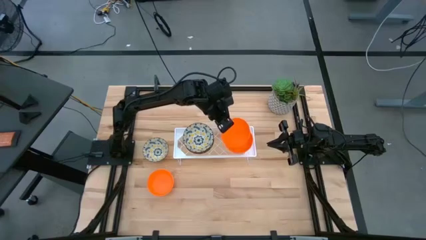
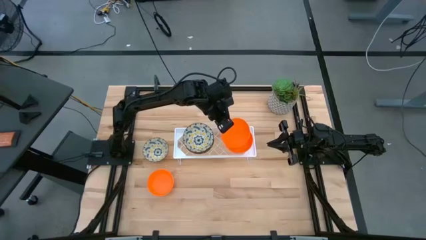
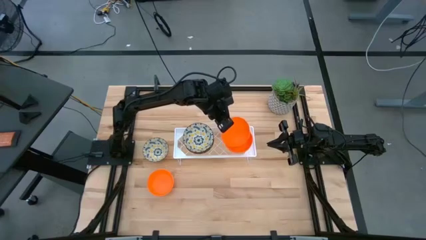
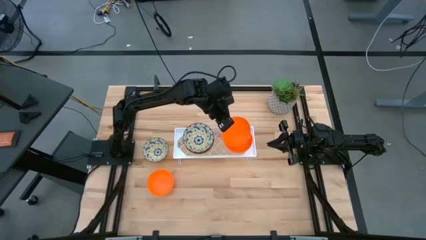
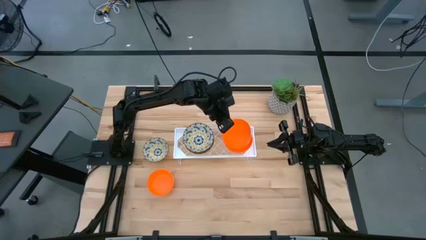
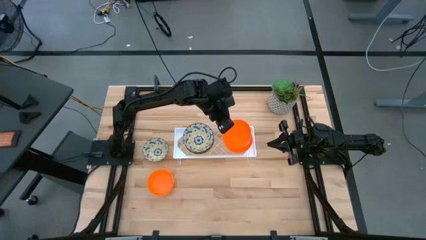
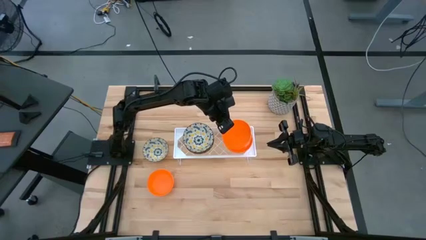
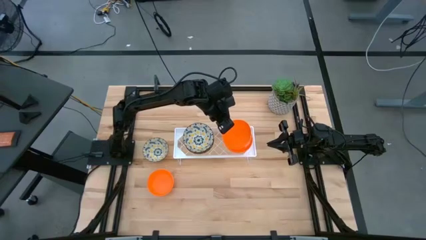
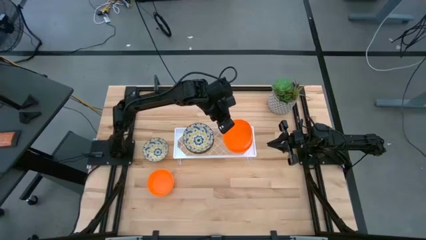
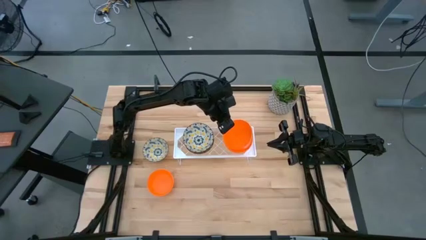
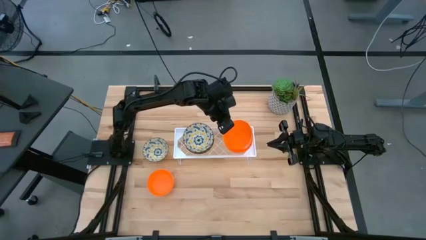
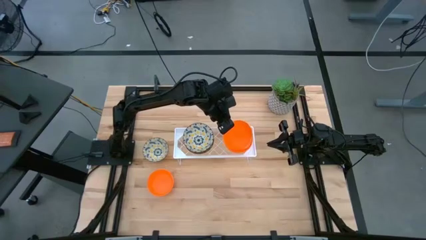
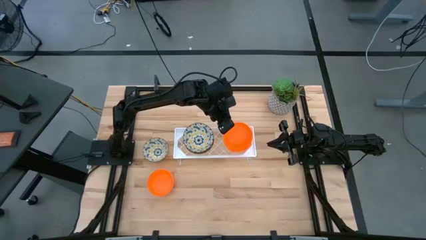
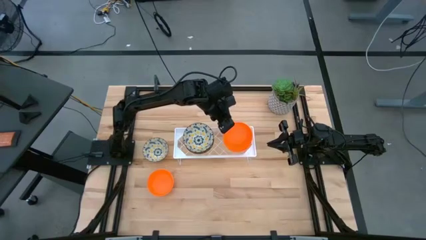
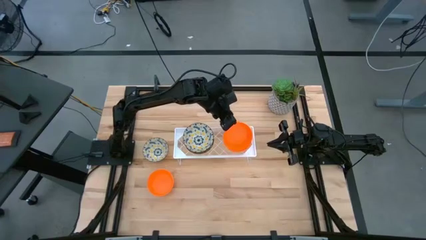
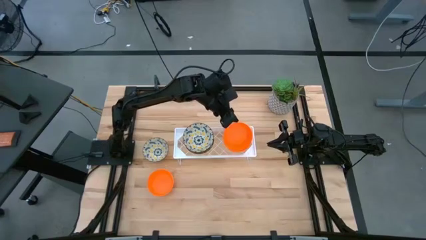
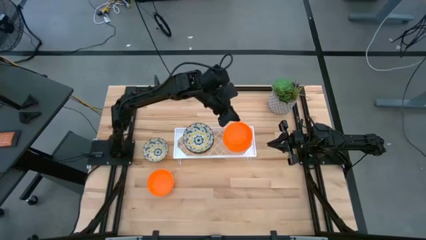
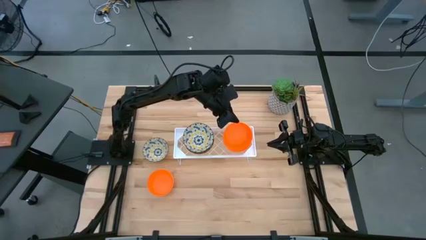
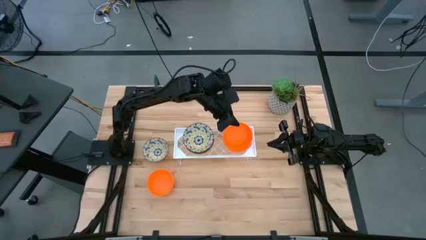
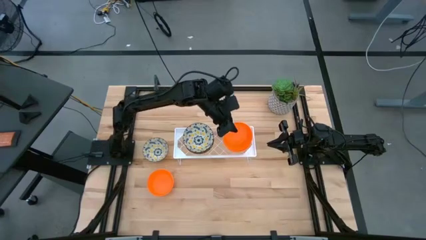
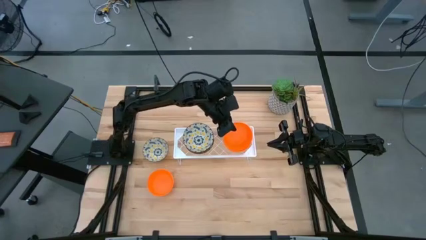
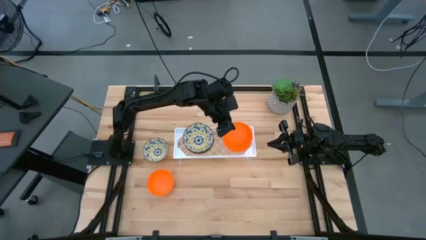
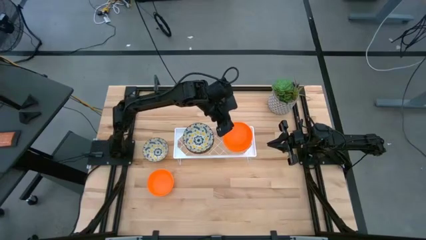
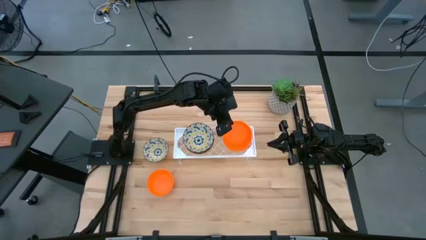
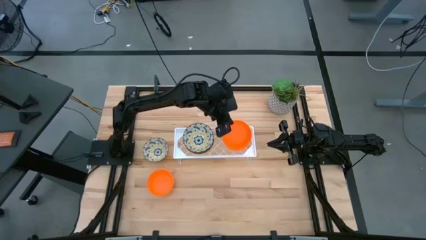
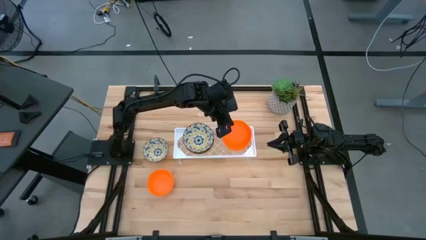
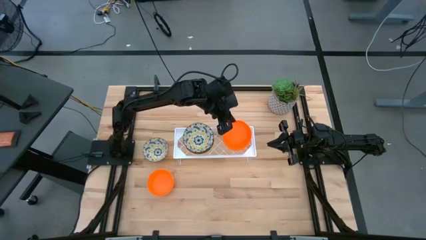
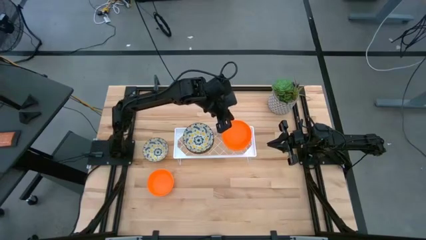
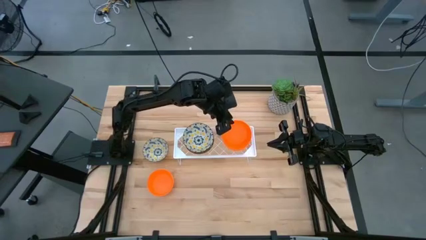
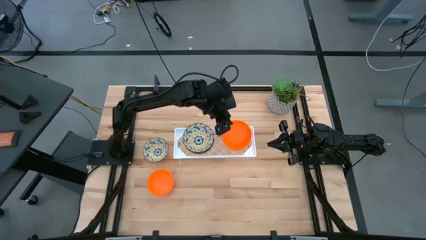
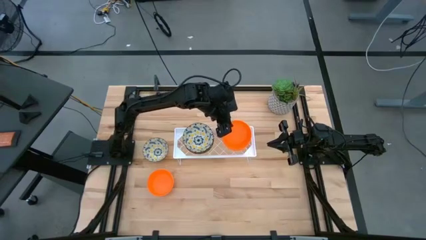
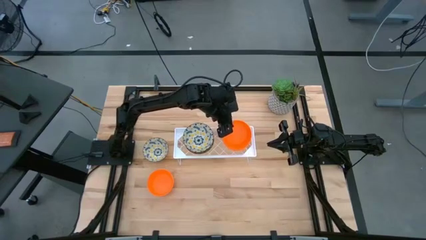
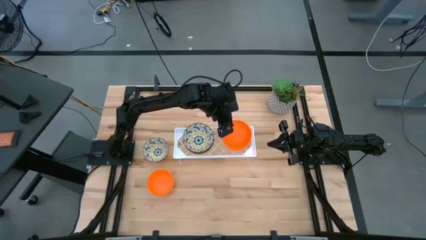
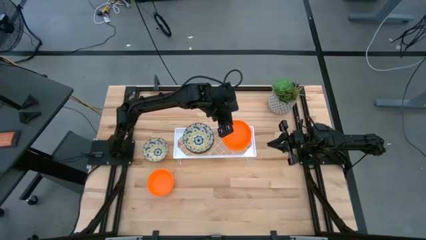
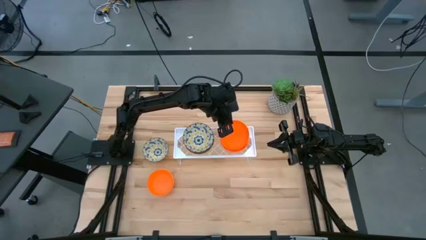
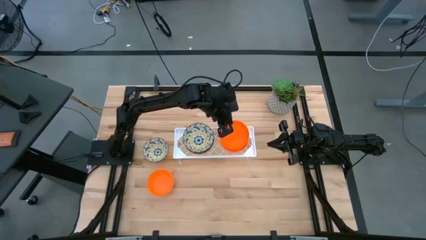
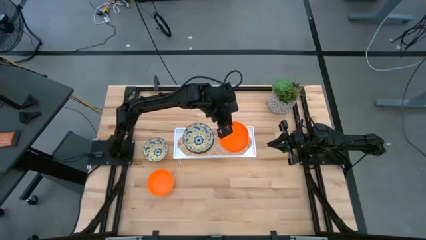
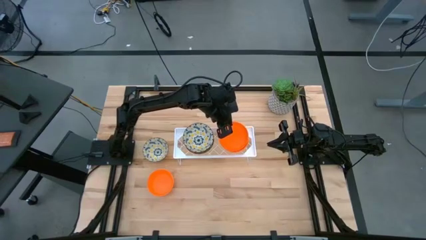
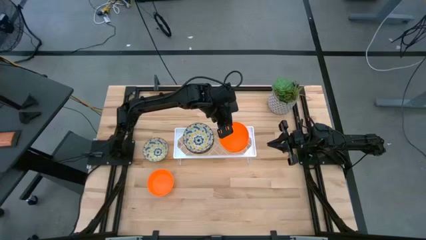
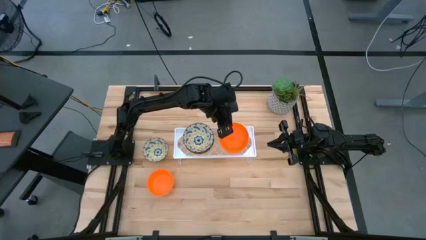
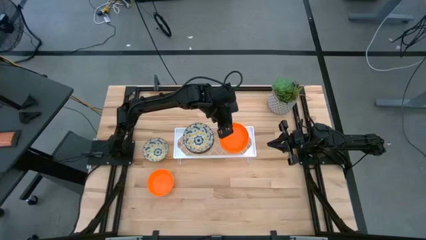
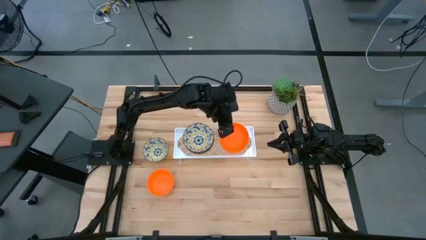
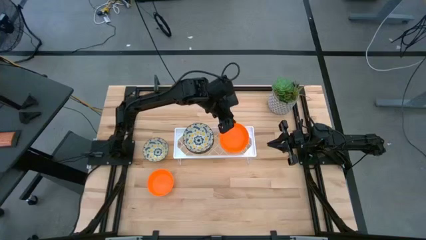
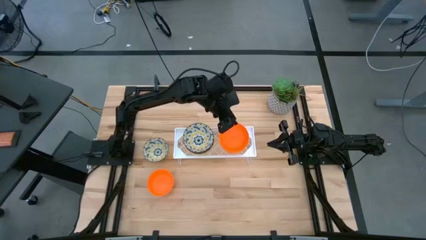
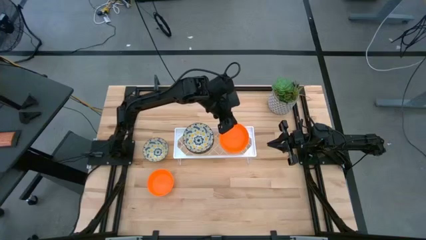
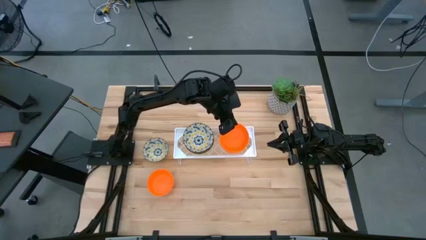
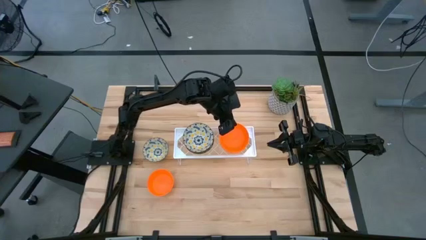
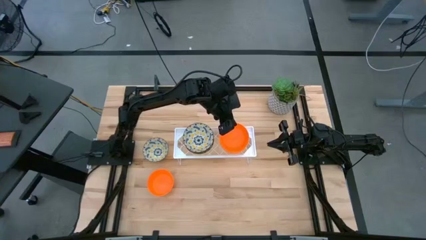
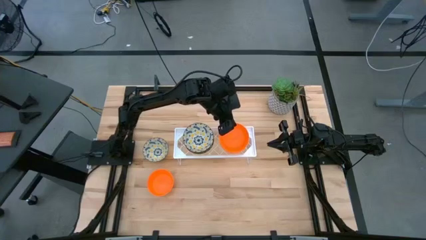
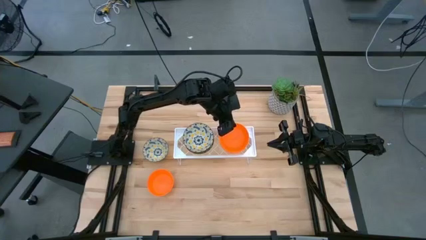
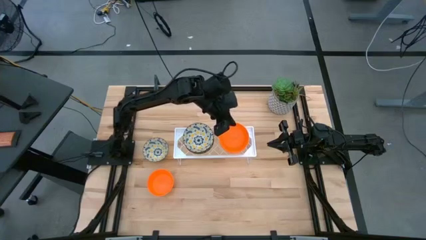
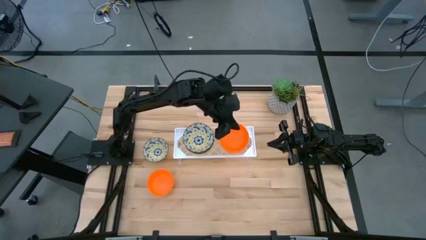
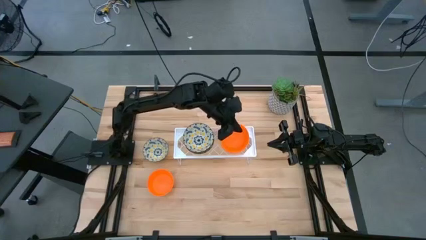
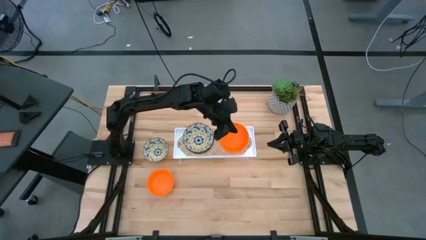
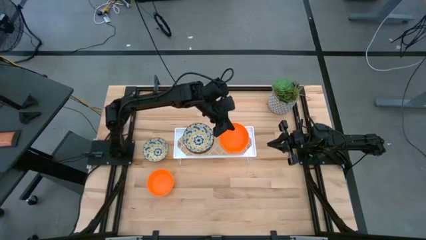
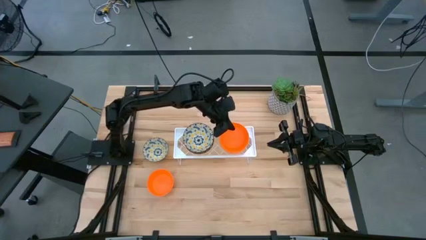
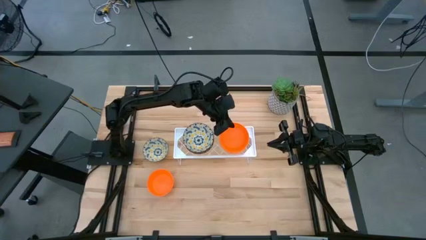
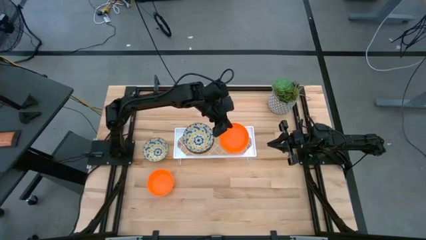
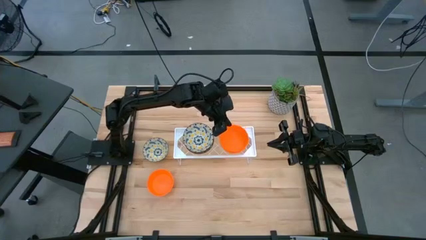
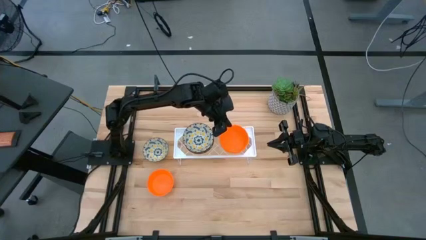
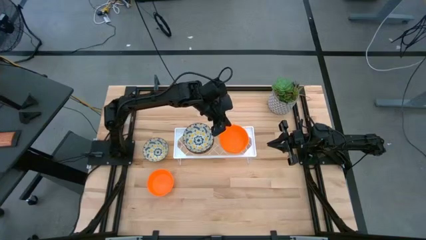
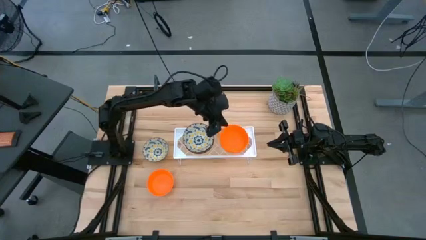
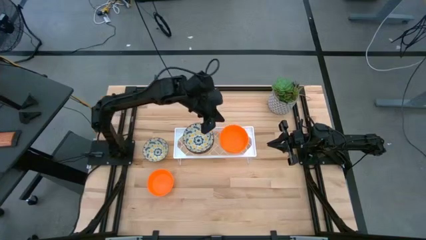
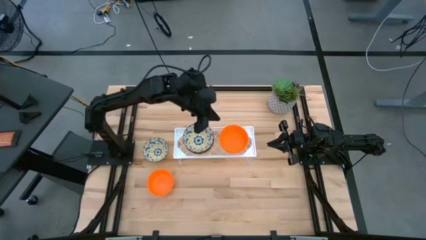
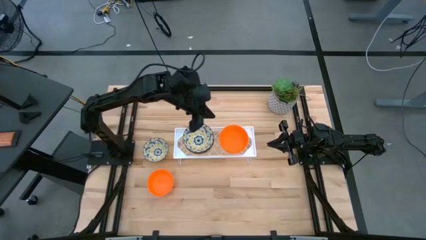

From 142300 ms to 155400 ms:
Task: Pick & Place Mini bowls
Stack the orange bowl on the orange bowl on the shelf
